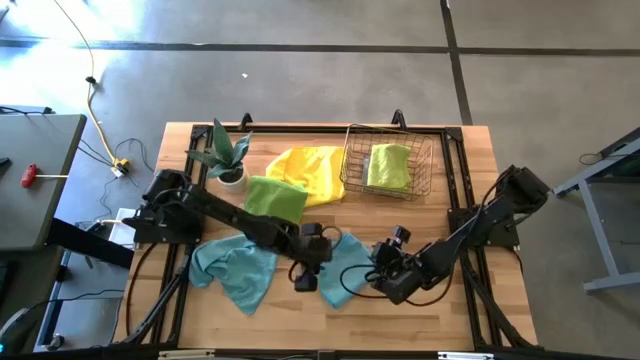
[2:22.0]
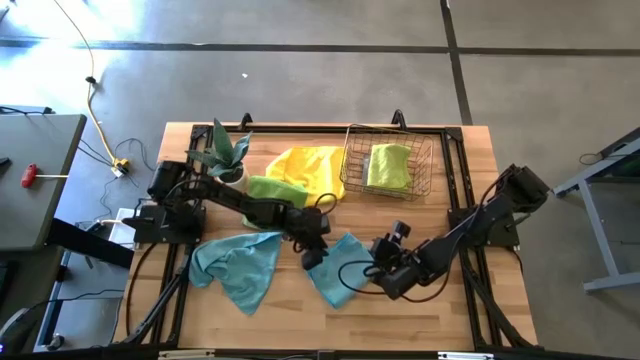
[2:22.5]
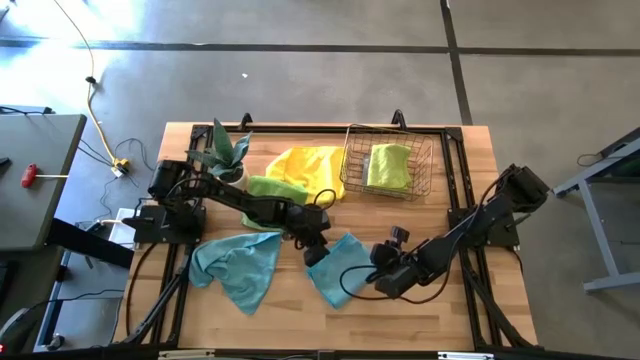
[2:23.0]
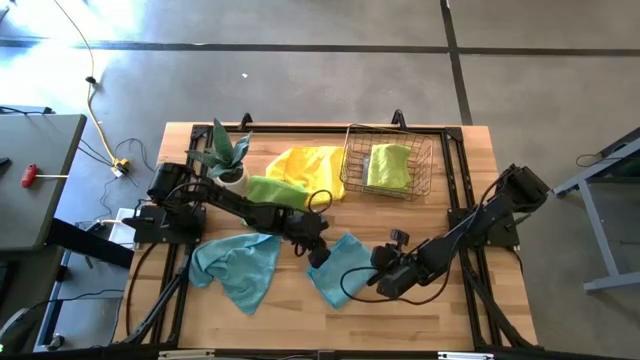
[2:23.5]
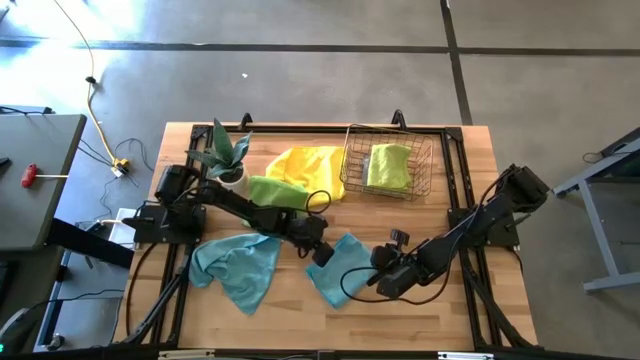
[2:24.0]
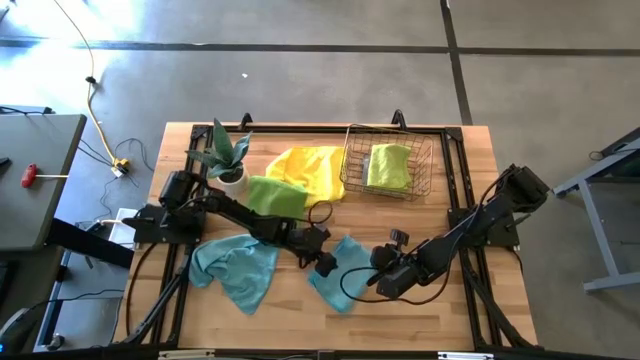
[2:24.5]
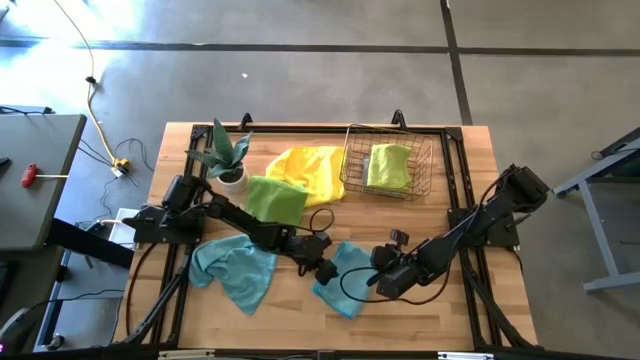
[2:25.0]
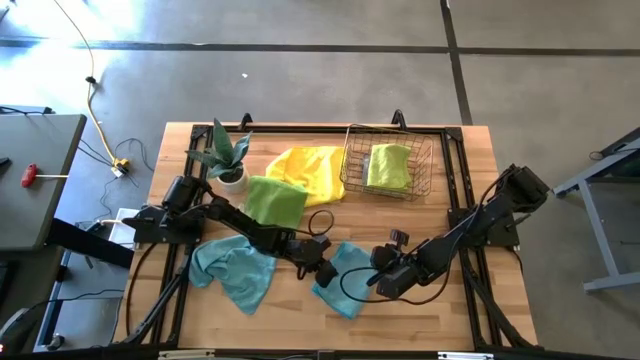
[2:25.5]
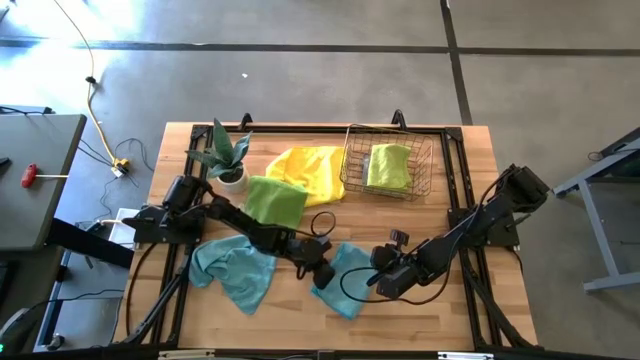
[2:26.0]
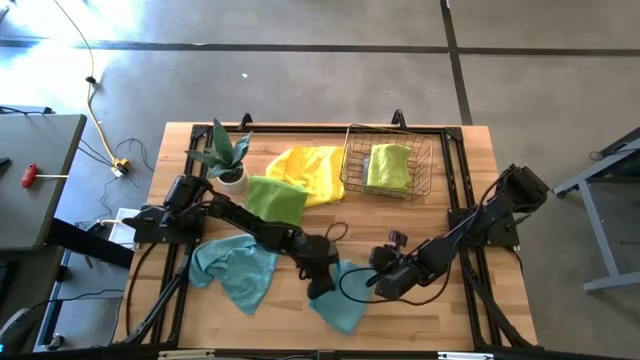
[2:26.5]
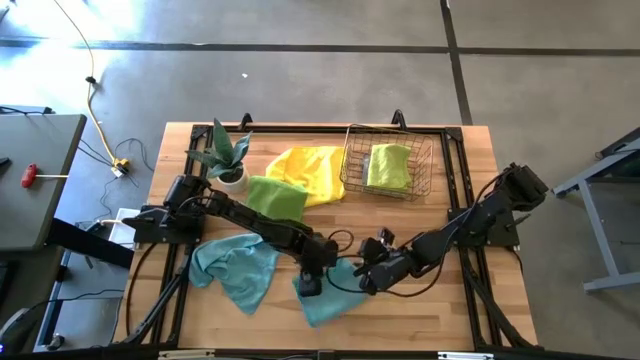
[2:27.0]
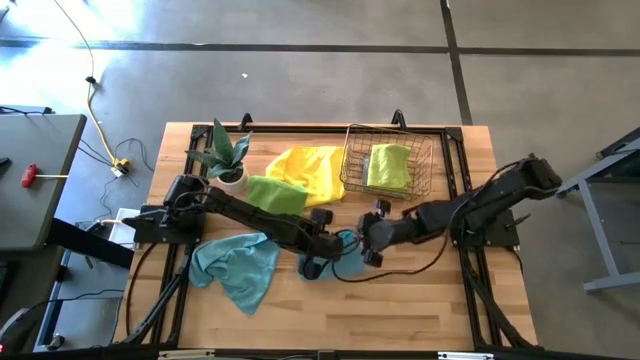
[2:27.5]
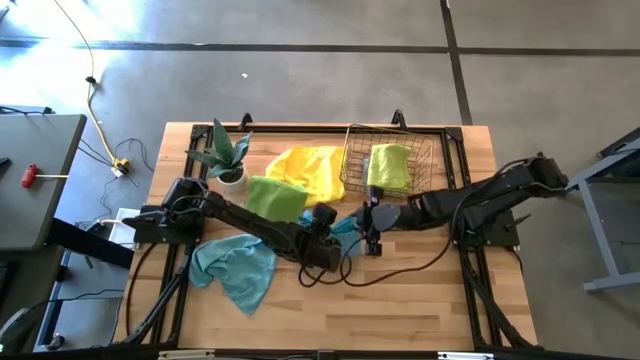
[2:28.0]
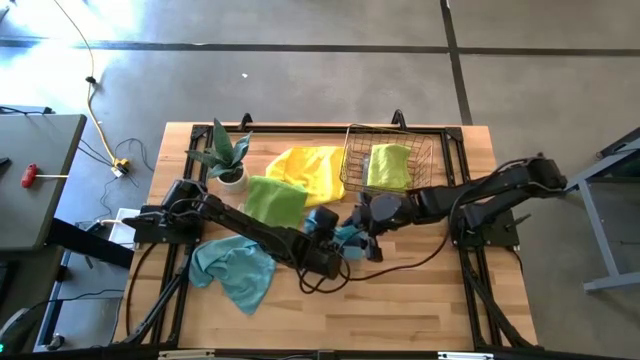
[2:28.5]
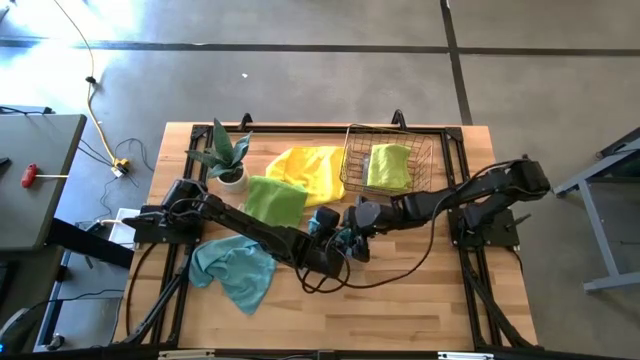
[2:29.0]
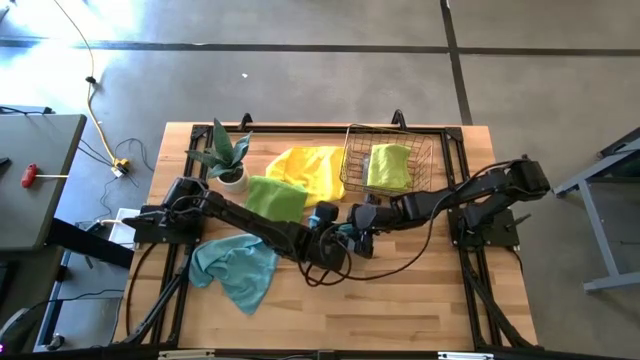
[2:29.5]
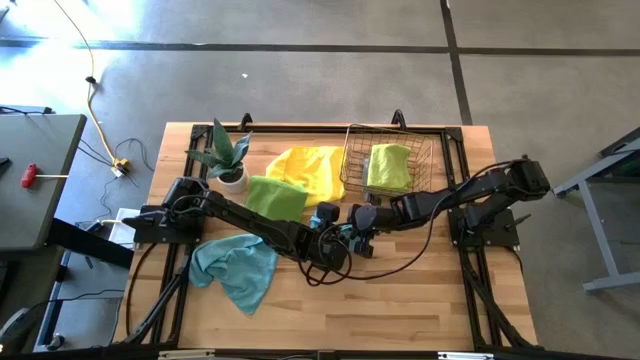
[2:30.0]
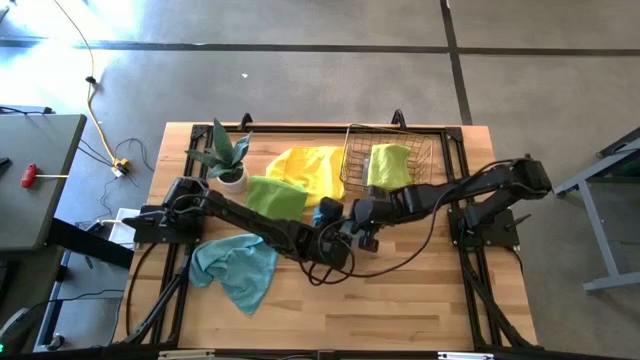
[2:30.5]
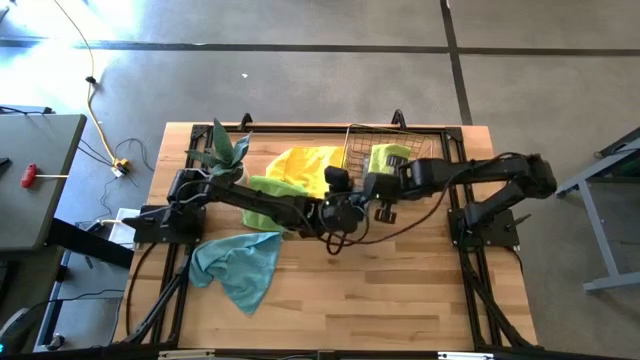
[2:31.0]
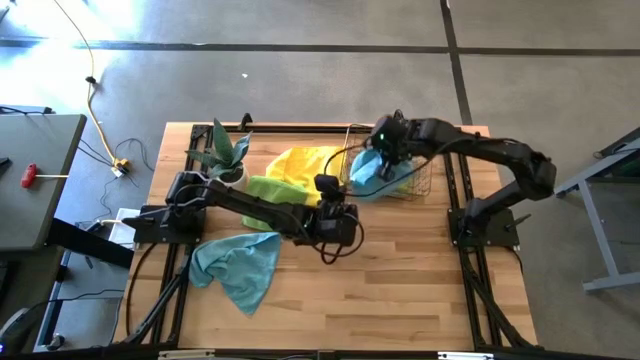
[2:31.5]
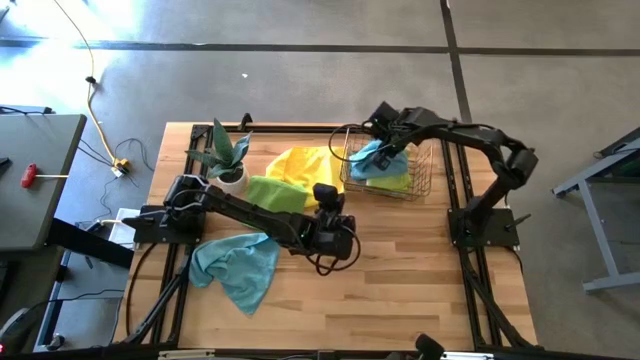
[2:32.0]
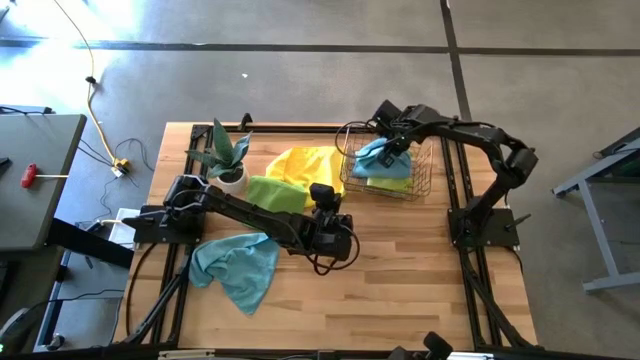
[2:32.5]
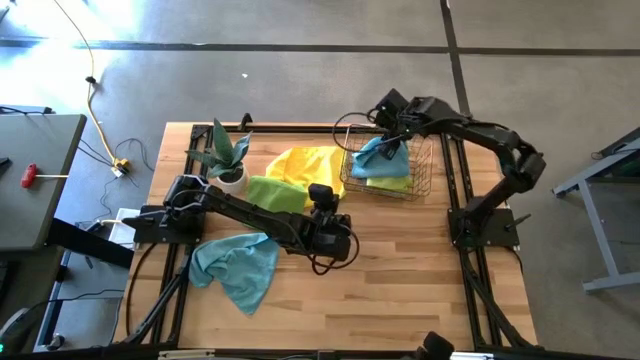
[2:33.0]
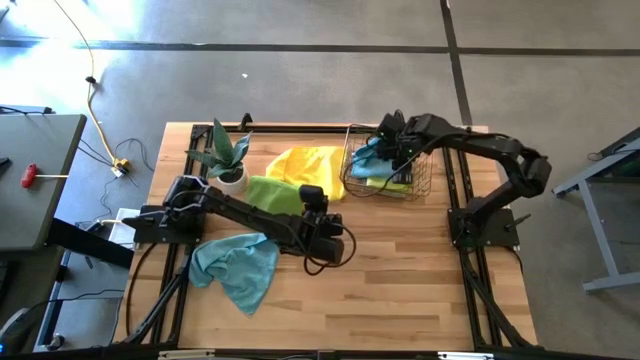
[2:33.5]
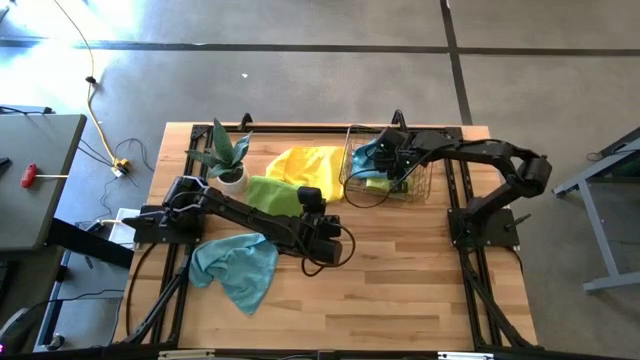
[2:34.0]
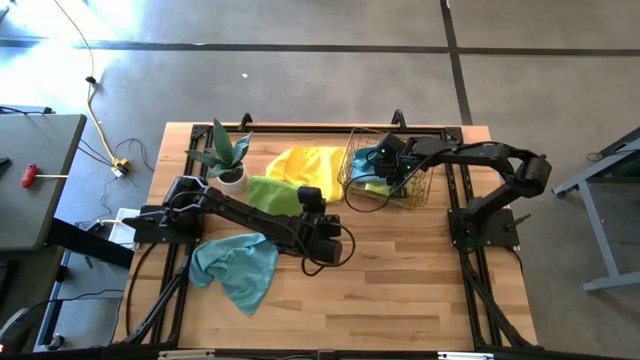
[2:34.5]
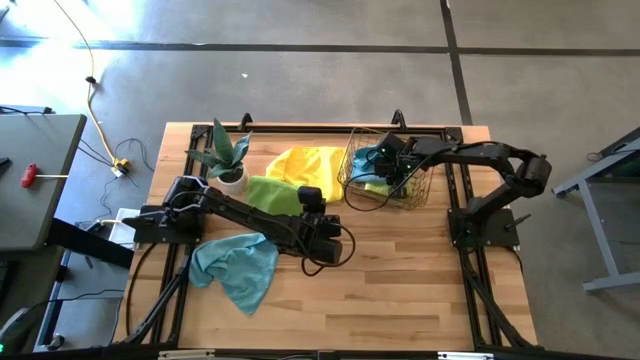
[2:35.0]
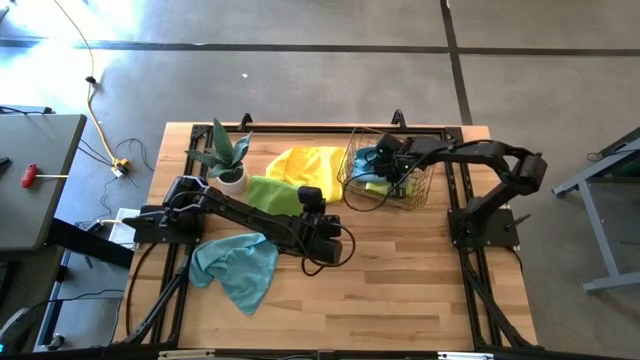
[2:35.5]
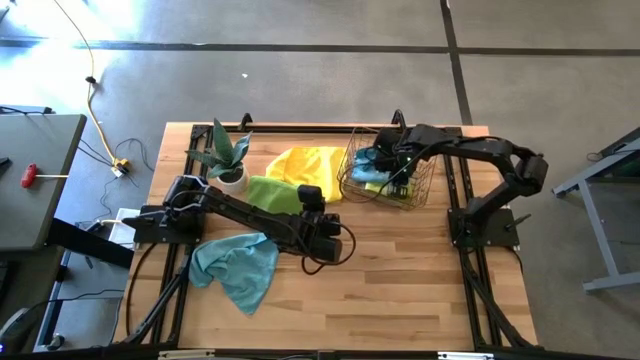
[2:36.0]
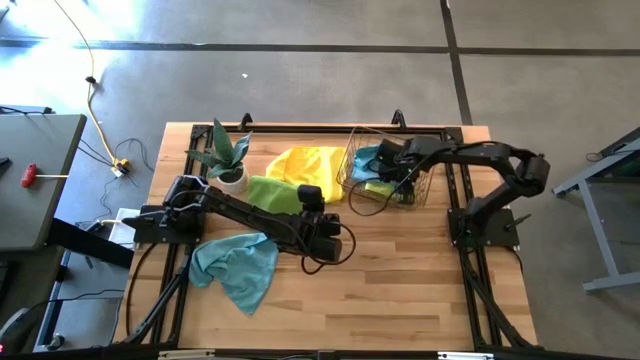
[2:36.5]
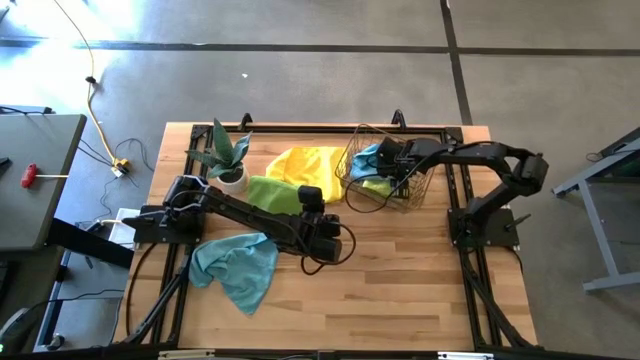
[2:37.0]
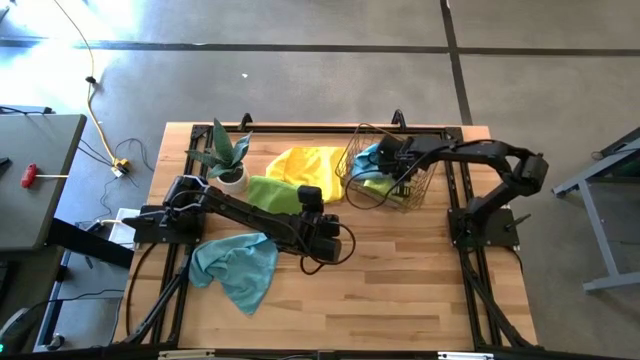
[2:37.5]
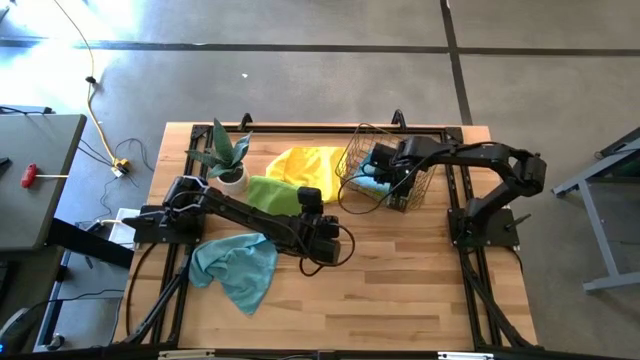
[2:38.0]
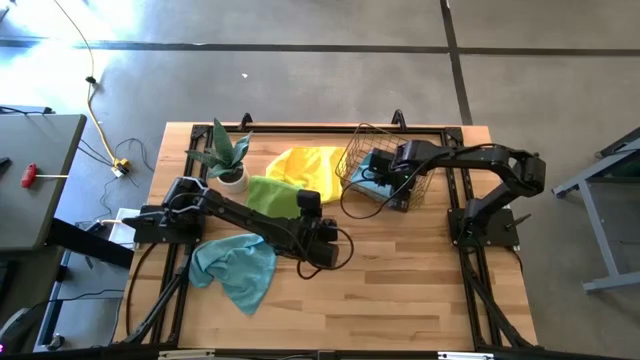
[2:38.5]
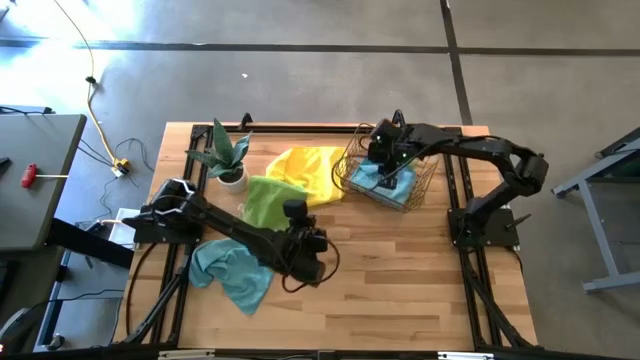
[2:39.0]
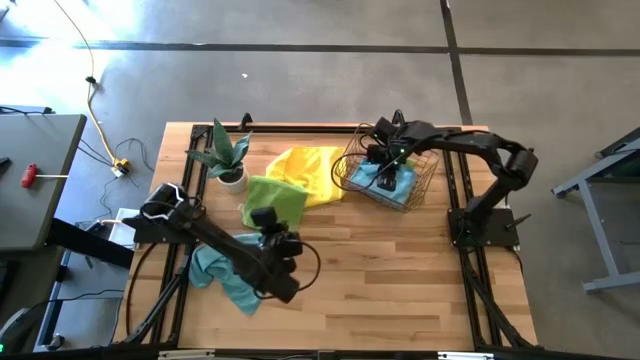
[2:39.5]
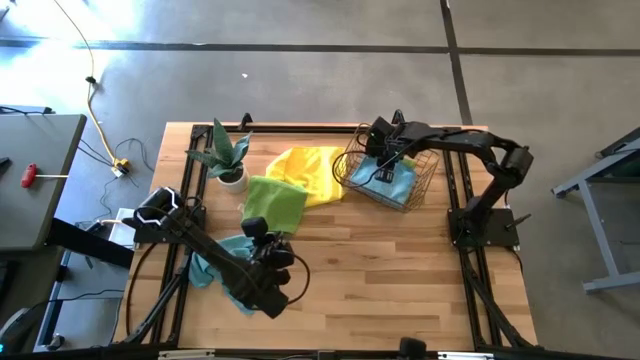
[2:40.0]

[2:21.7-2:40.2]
Task: Fold microfiber towels
Put the right blue microfiber towel into the wire basket
